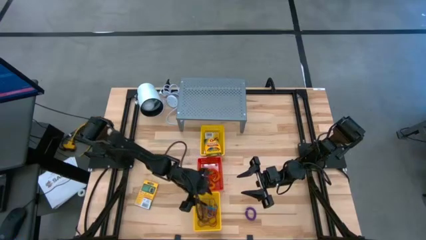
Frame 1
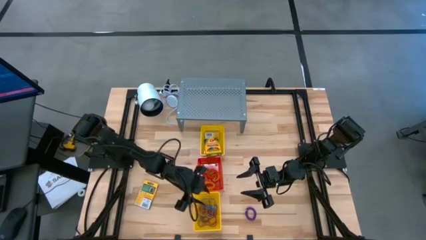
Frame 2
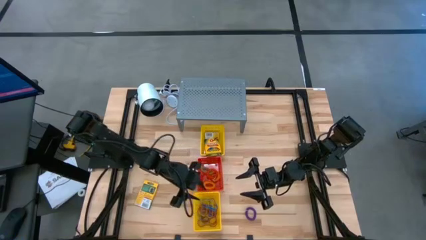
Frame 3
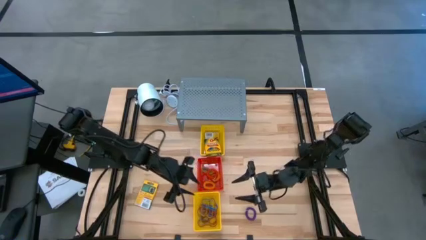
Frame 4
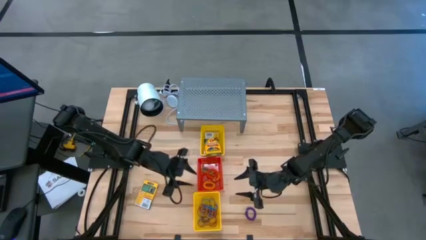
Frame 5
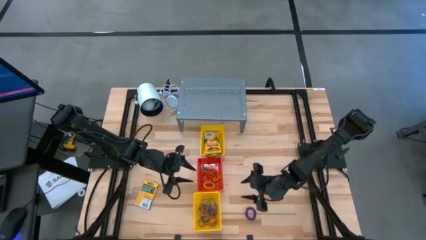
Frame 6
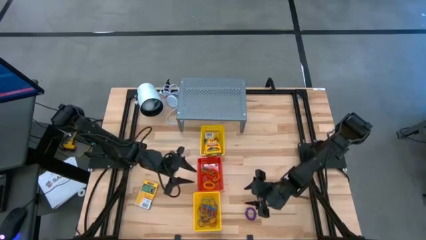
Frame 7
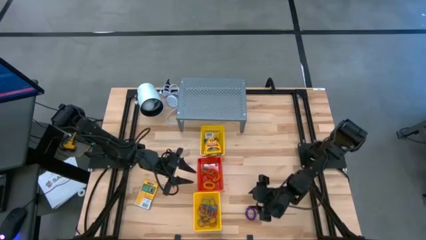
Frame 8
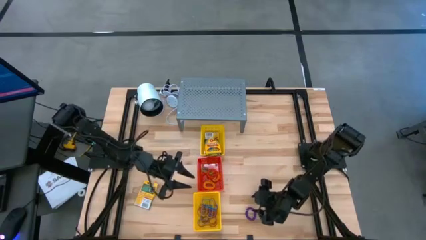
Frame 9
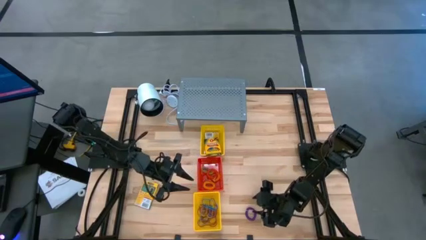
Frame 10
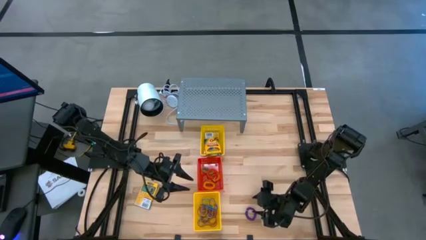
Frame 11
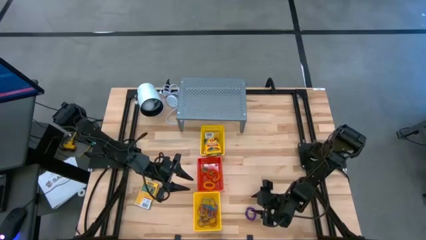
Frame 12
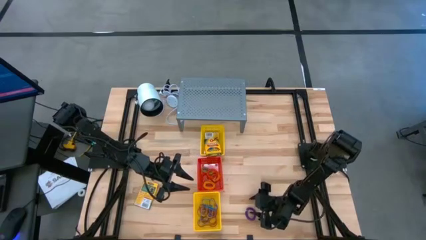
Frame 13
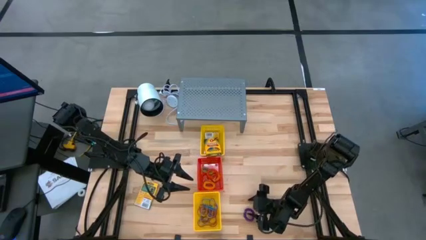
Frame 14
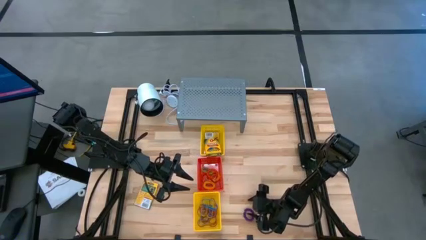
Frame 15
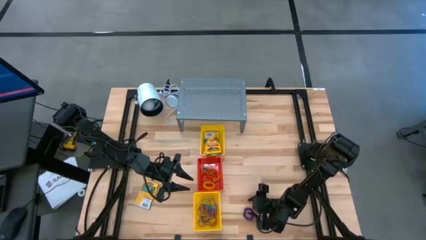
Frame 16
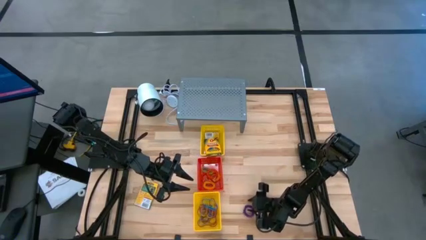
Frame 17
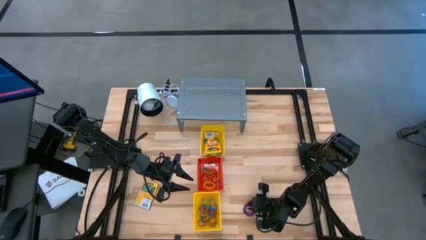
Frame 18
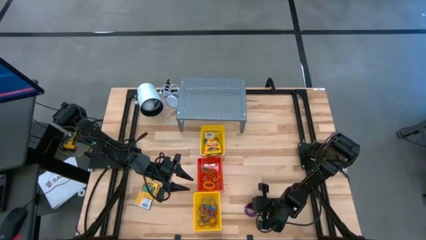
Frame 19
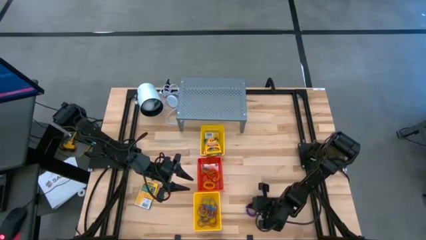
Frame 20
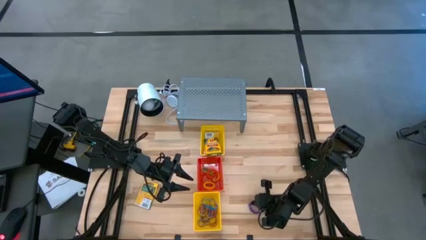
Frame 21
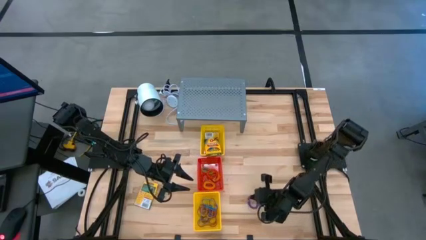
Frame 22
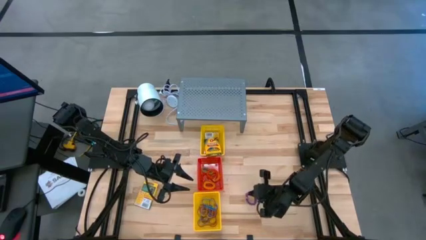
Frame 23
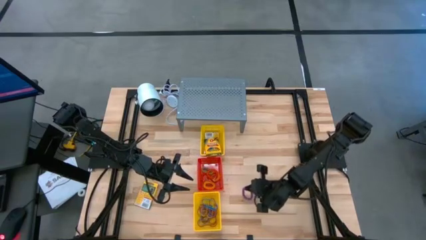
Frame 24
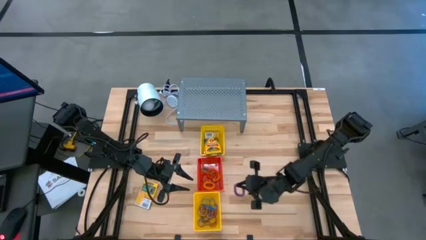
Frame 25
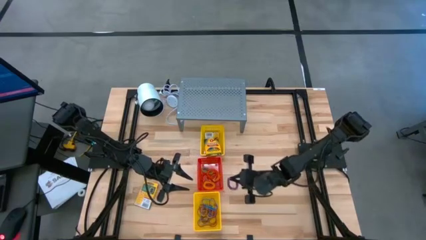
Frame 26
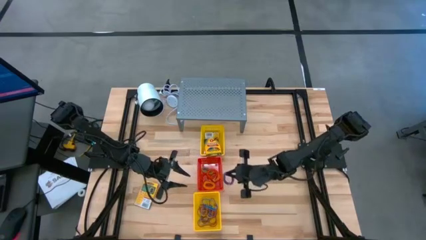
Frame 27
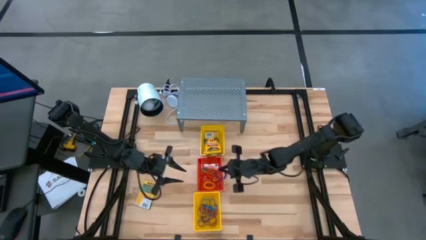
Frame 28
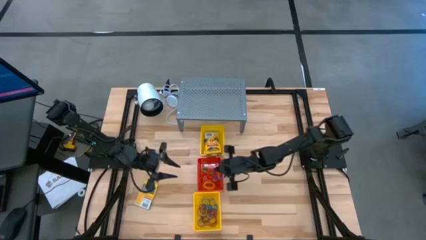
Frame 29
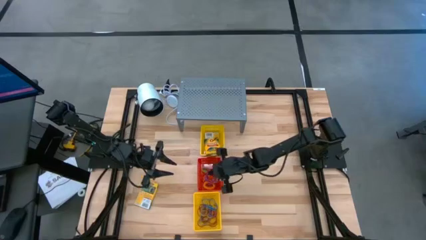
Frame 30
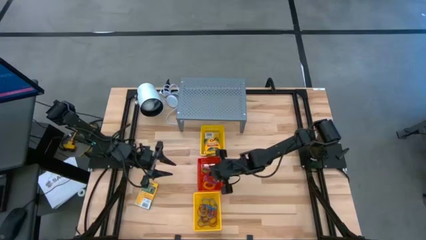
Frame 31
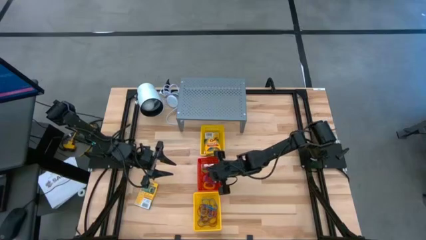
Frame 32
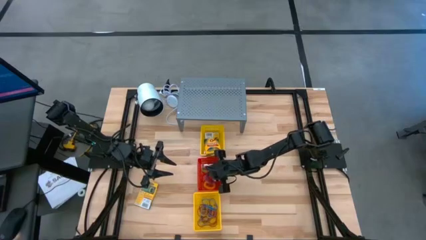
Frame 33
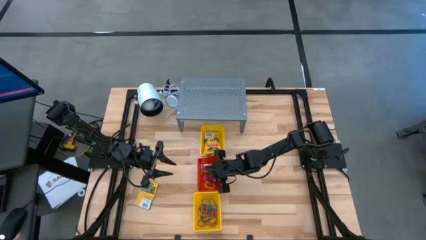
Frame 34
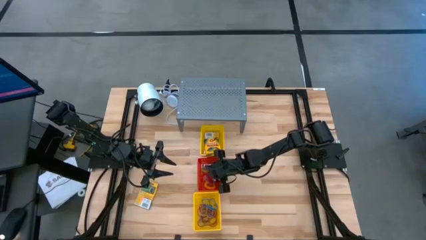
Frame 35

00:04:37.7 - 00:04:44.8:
Task: Pick & Place Office Desk Supplies
Put the purple spring rubber band into the red bin

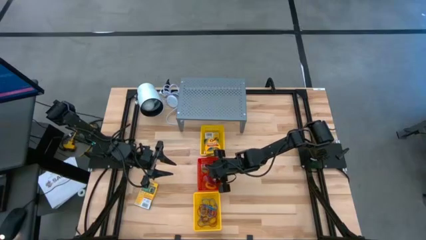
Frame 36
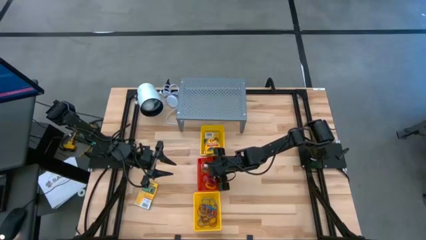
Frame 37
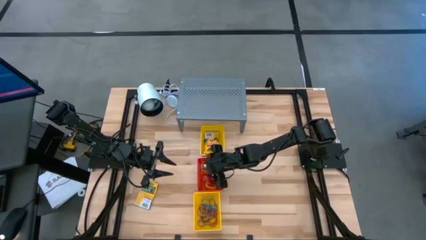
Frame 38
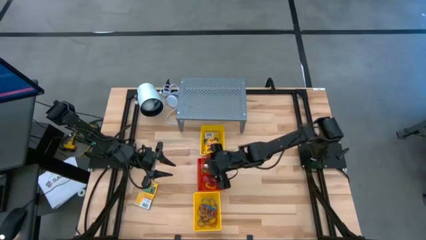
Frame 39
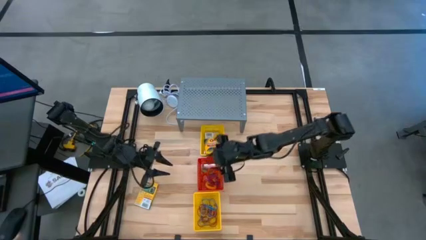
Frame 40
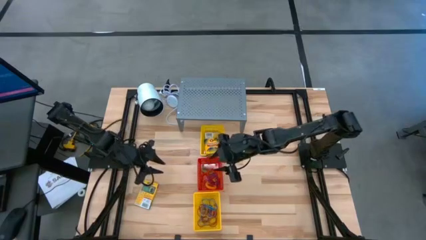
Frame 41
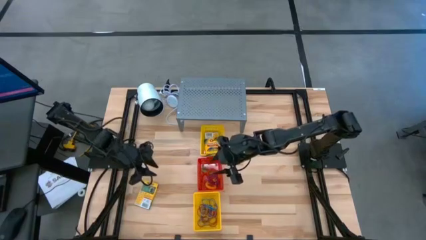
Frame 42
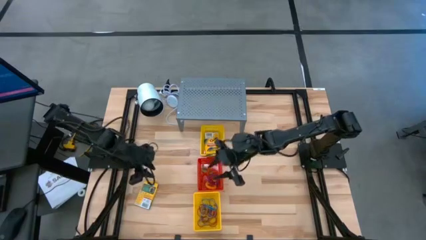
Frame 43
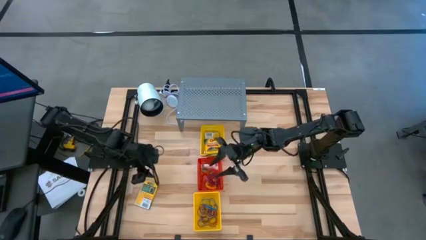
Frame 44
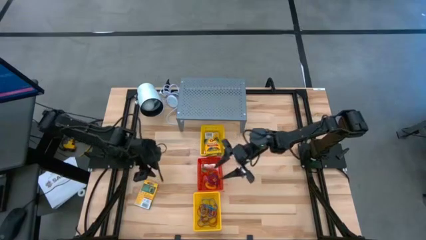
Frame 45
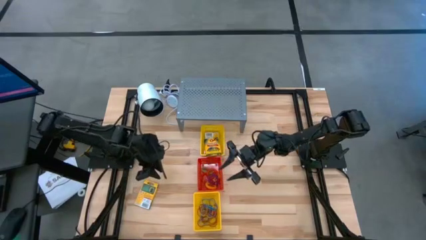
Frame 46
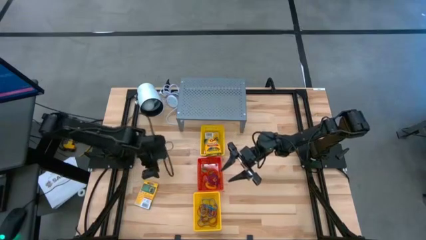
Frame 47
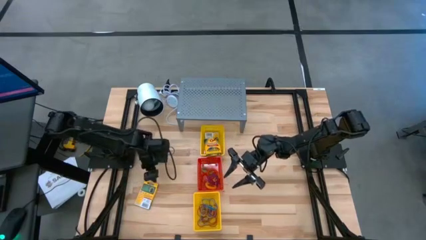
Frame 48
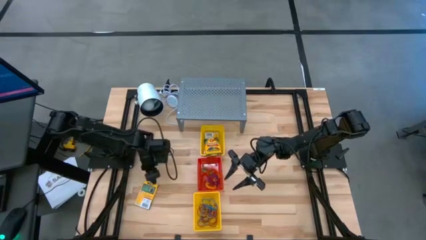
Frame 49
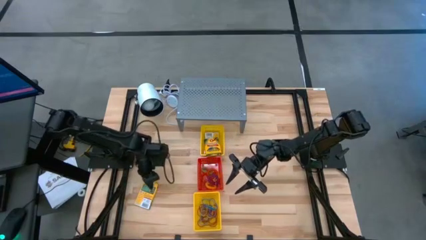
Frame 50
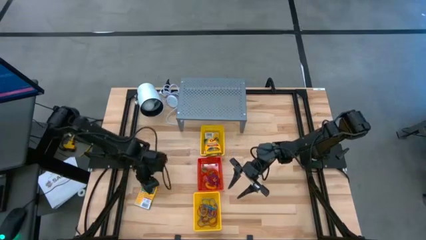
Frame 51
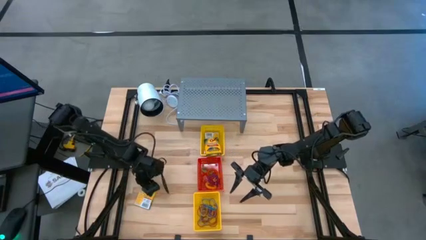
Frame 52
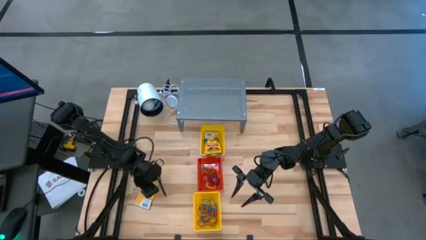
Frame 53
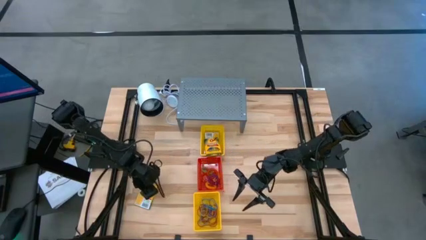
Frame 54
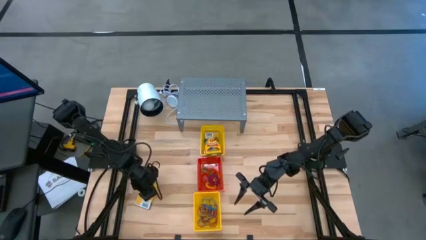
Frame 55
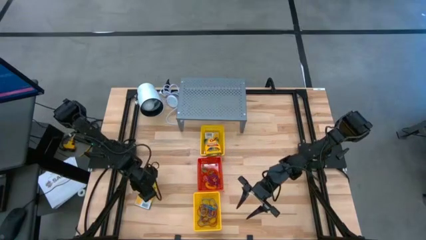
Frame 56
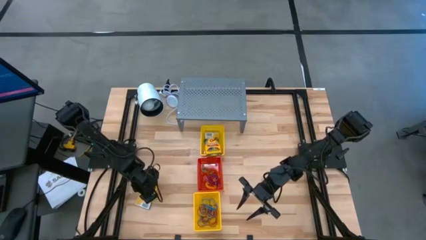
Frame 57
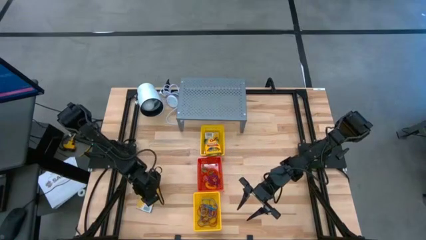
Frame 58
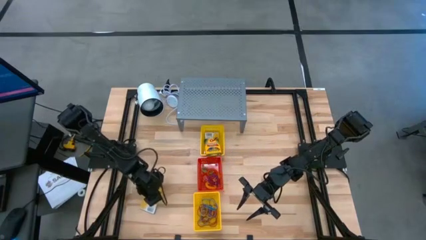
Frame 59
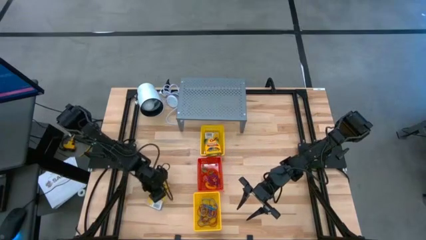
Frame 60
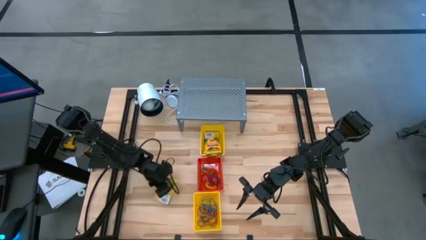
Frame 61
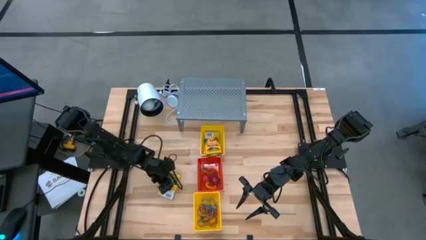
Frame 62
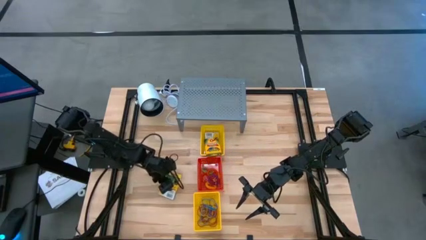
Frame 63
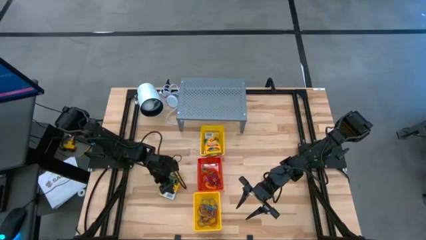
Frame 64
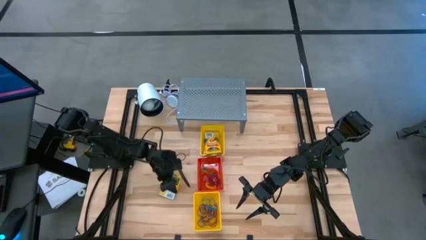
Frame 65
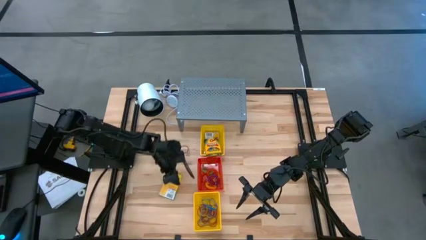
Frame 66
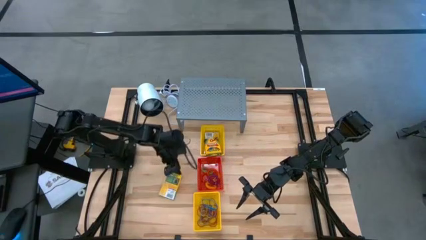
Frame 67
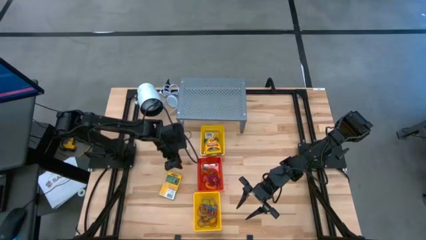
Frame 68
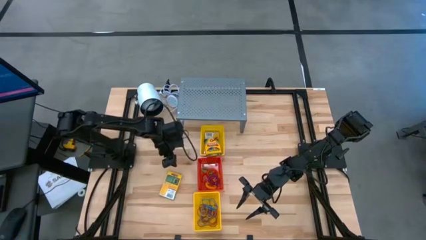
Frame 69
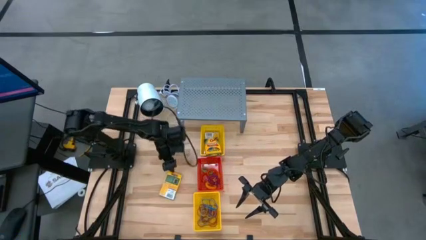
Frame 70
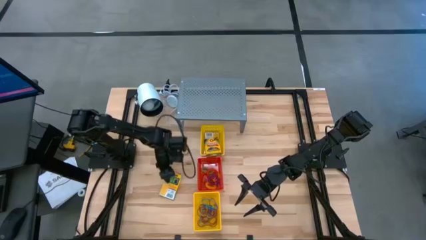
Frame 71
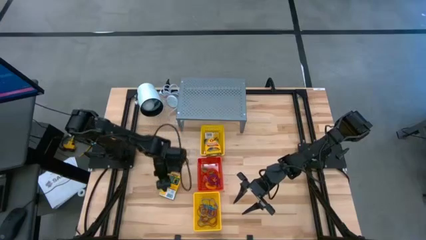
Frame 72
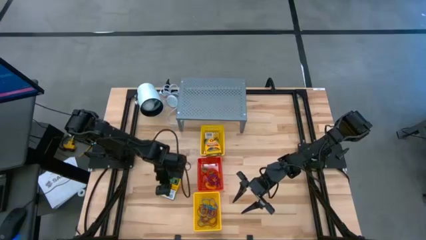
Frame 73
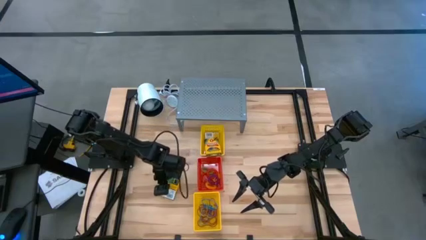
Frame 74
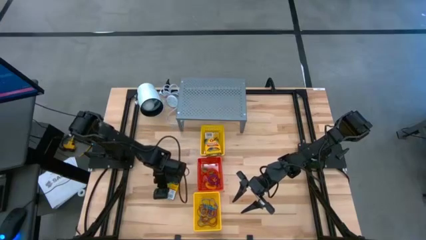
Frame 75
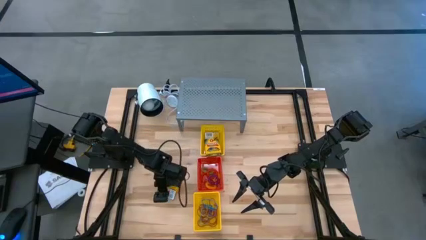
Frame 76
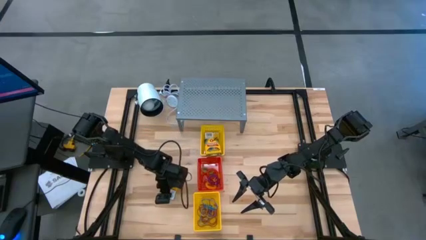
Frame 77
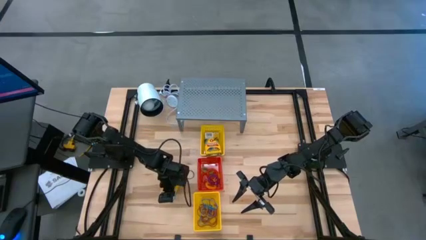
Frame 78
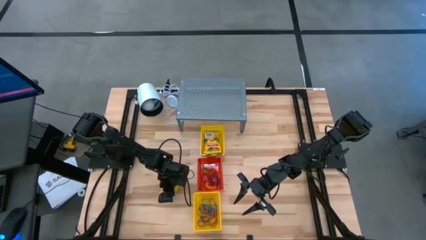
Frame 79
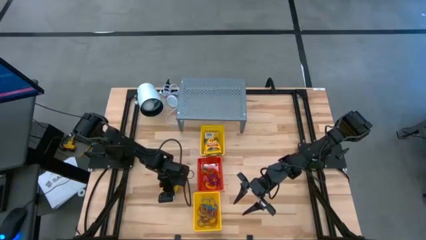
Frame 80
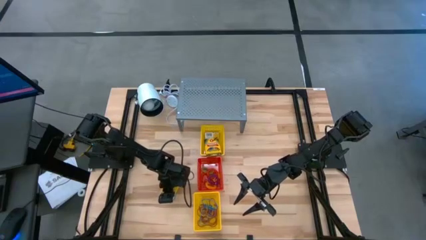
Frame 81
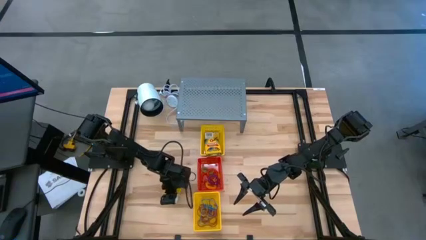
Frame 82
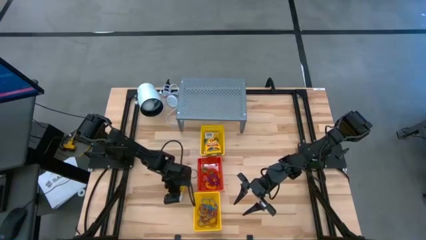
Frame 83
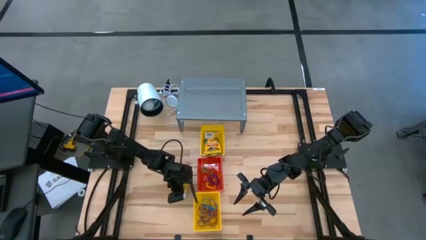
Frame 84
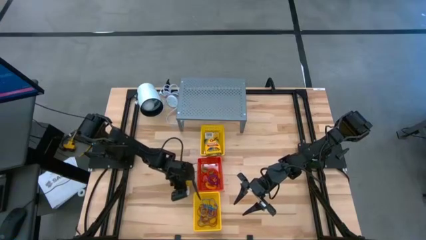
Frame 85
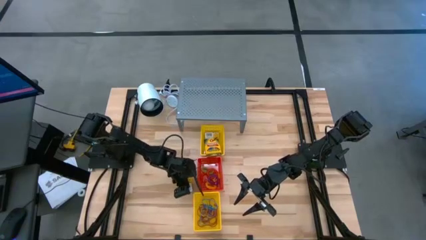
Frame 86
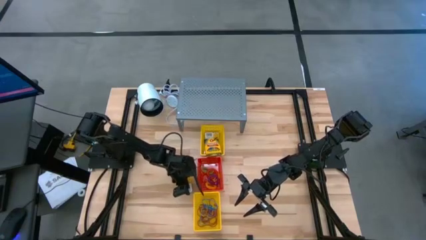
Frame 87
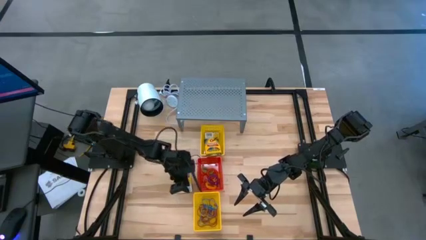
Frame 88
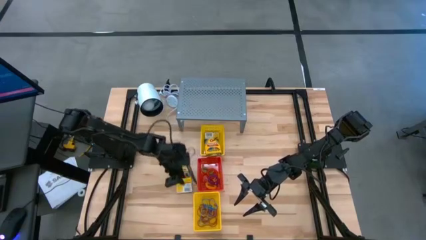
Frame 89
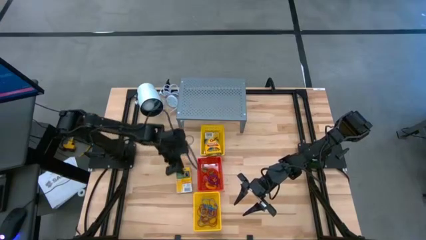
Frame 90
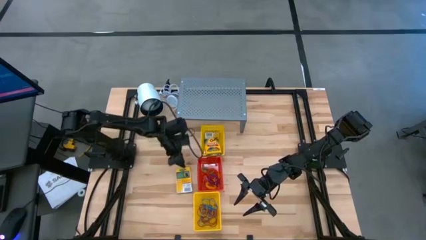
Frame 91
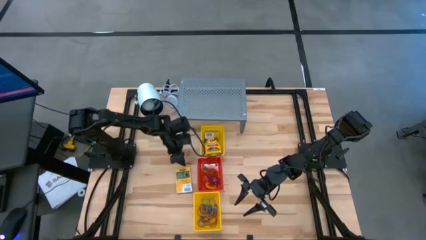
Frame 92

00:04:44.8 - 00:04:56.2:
Put the crayon into the top yellow bin
